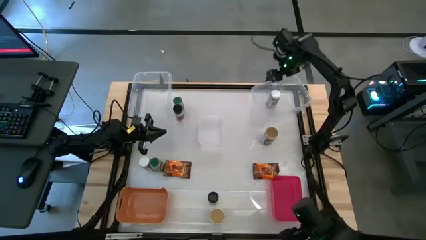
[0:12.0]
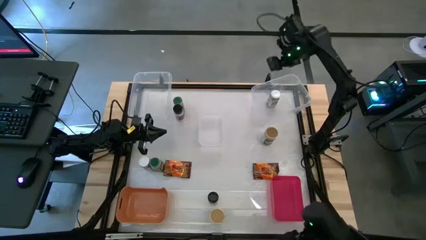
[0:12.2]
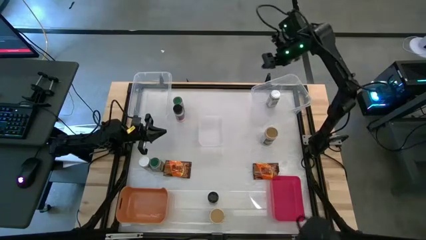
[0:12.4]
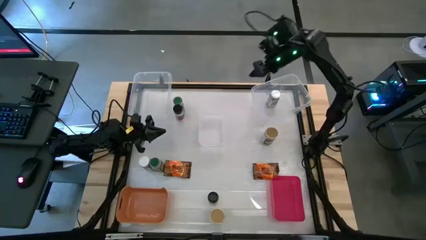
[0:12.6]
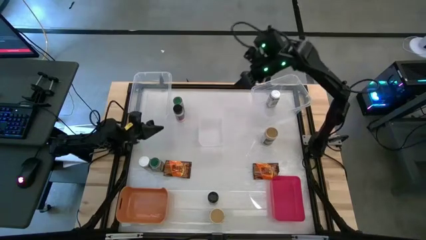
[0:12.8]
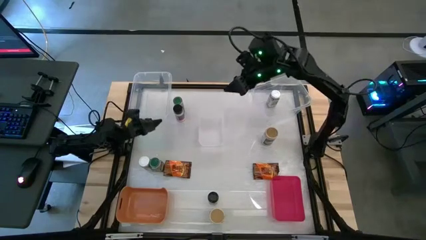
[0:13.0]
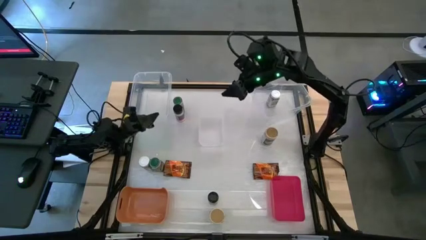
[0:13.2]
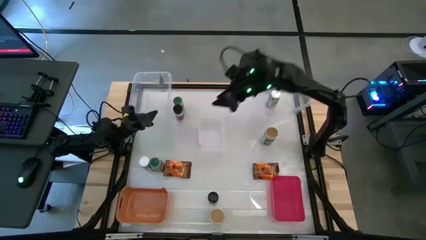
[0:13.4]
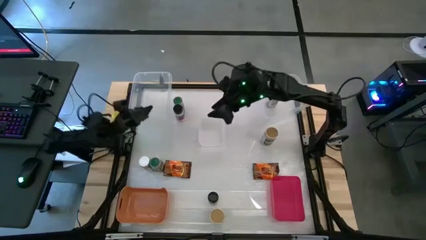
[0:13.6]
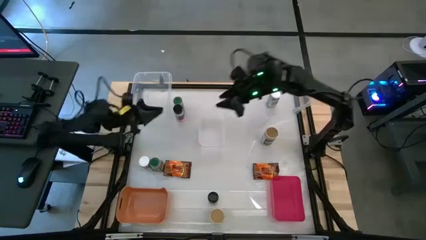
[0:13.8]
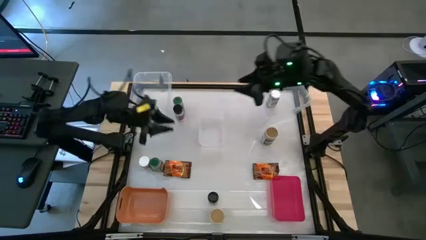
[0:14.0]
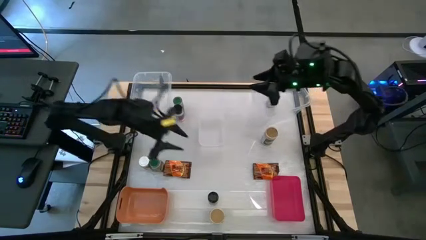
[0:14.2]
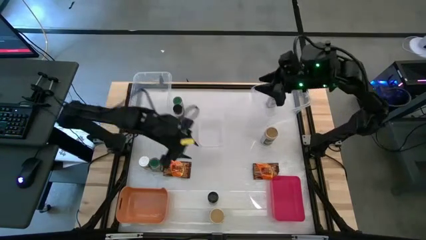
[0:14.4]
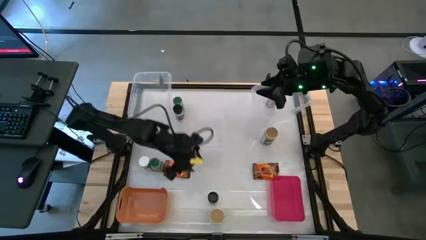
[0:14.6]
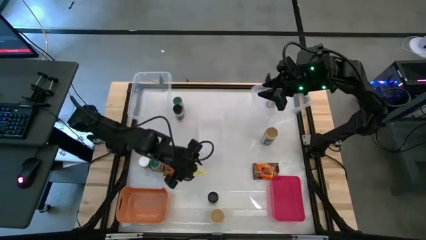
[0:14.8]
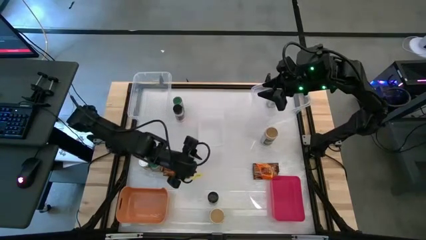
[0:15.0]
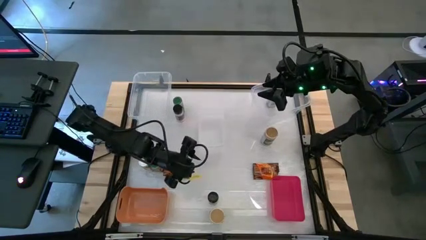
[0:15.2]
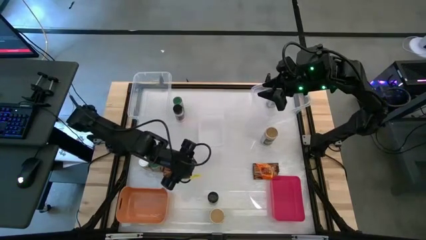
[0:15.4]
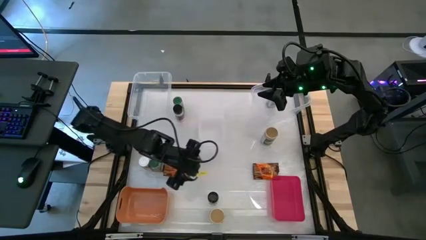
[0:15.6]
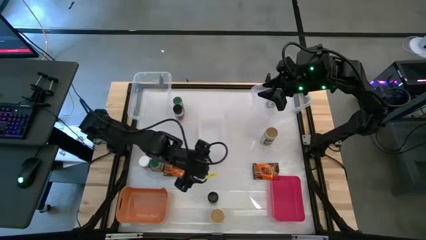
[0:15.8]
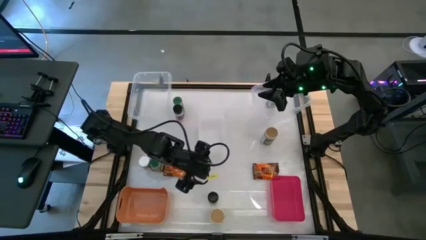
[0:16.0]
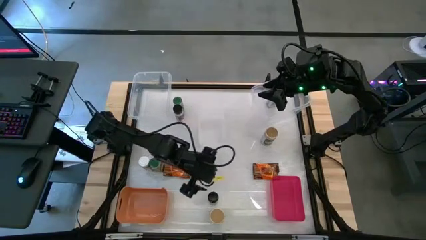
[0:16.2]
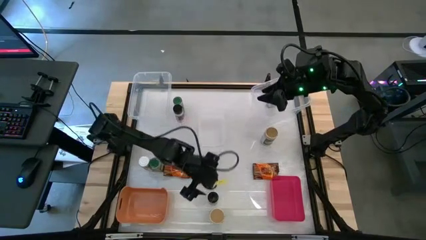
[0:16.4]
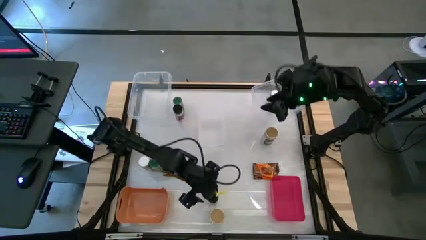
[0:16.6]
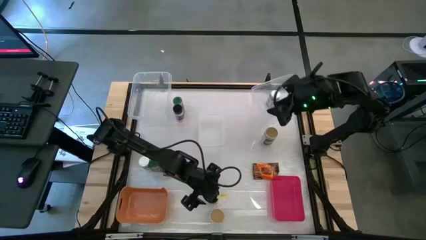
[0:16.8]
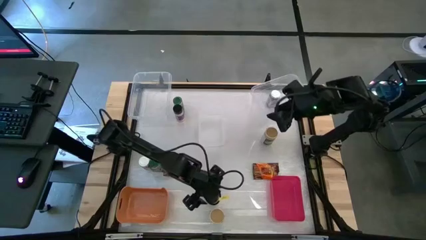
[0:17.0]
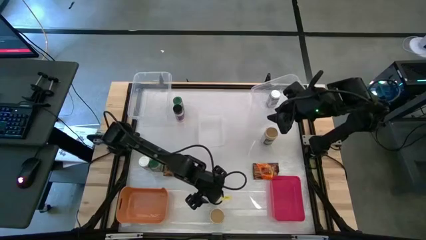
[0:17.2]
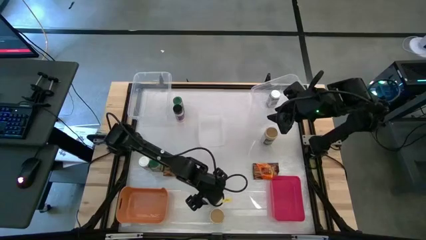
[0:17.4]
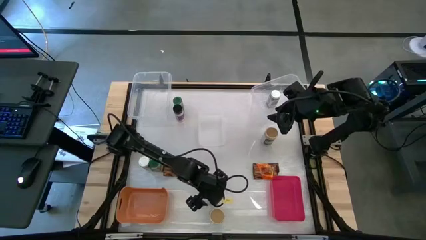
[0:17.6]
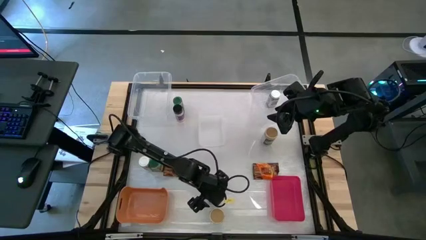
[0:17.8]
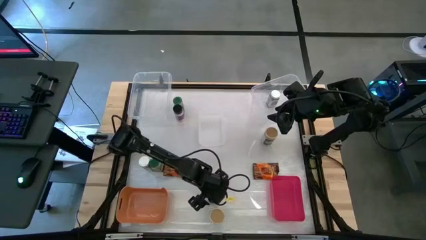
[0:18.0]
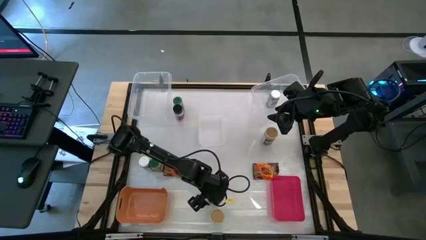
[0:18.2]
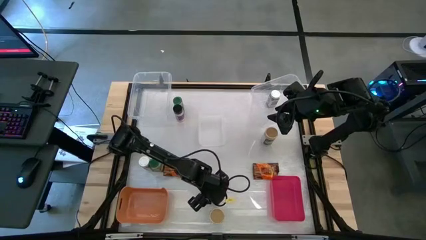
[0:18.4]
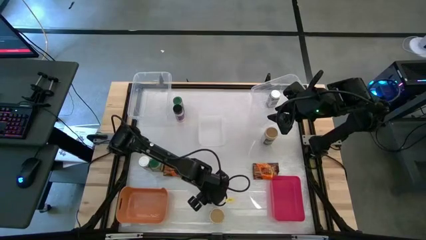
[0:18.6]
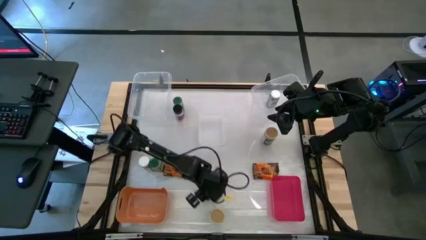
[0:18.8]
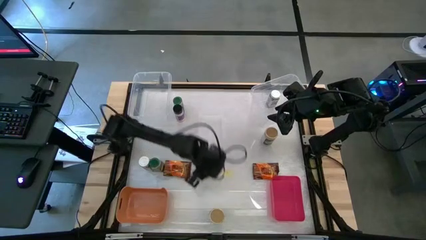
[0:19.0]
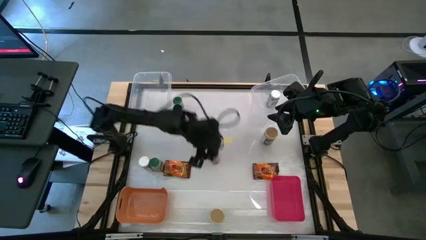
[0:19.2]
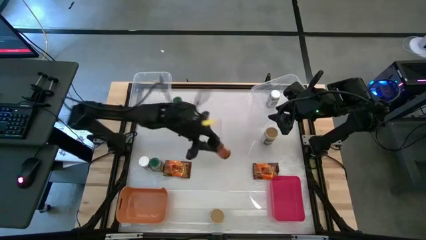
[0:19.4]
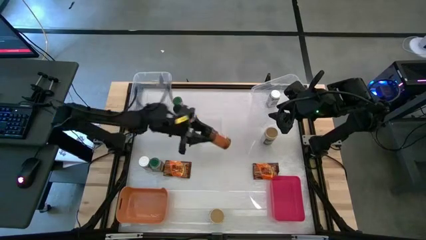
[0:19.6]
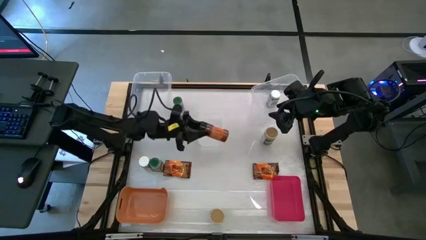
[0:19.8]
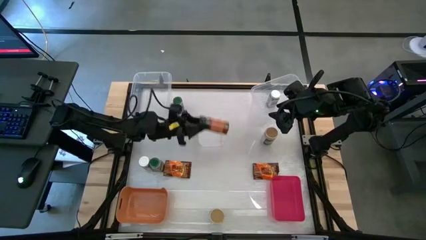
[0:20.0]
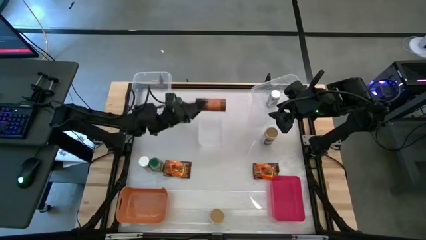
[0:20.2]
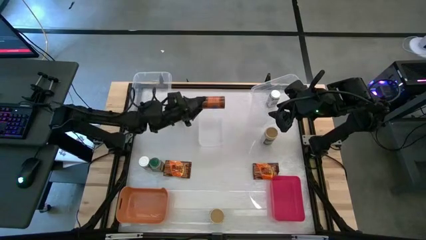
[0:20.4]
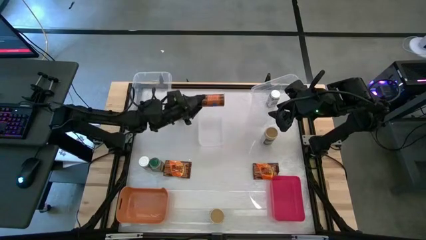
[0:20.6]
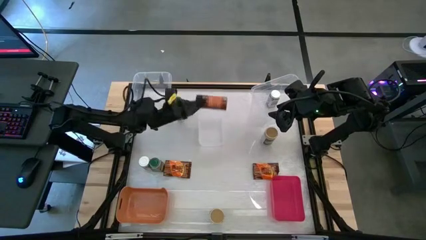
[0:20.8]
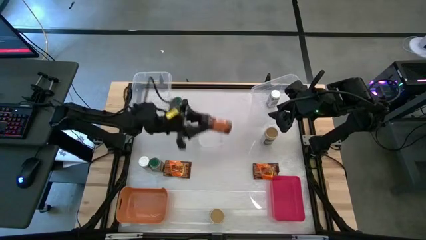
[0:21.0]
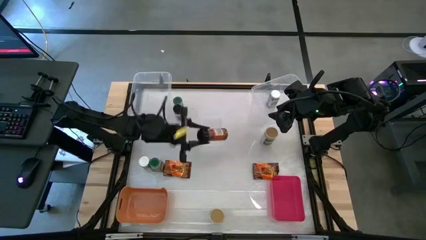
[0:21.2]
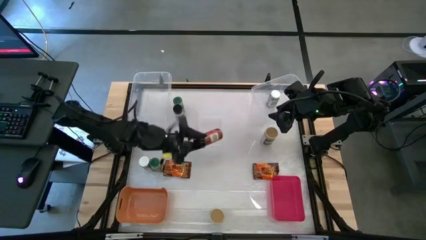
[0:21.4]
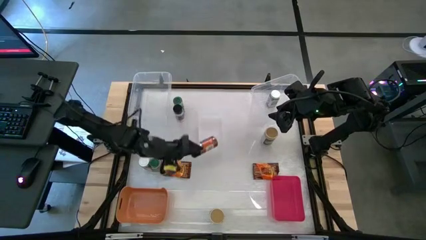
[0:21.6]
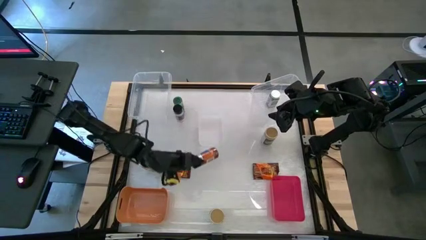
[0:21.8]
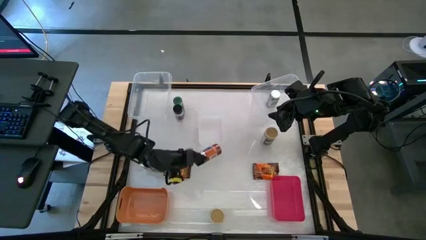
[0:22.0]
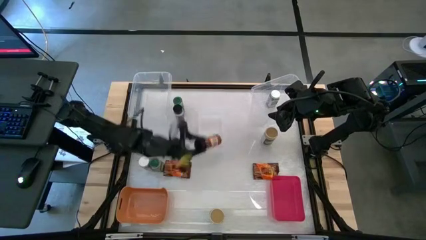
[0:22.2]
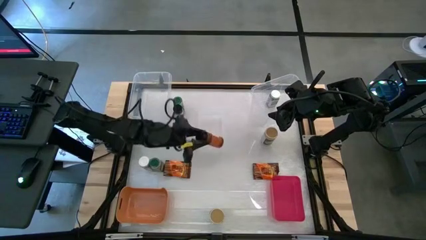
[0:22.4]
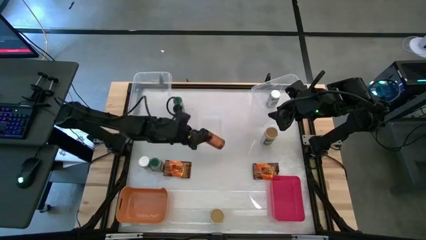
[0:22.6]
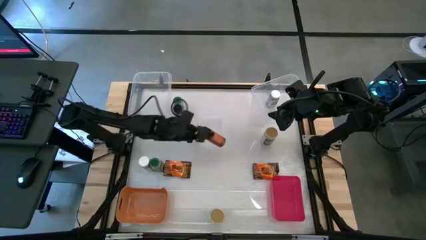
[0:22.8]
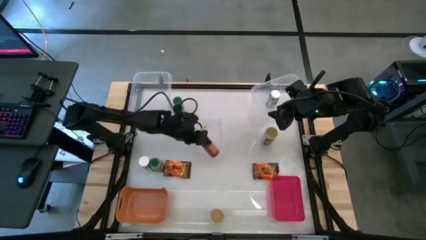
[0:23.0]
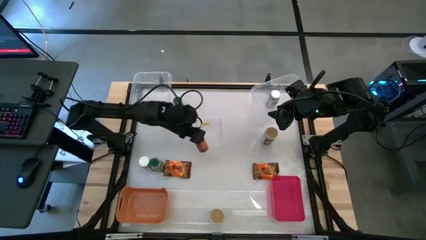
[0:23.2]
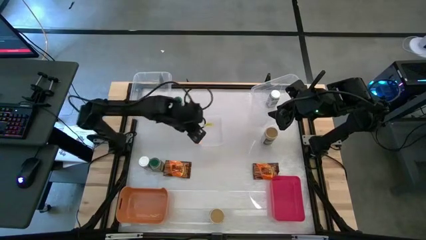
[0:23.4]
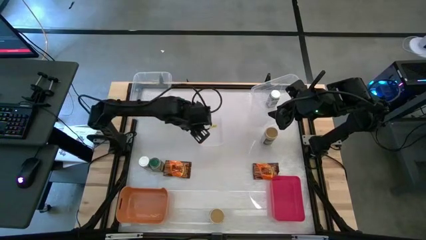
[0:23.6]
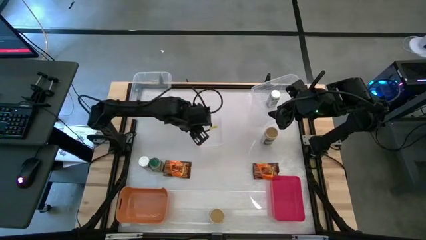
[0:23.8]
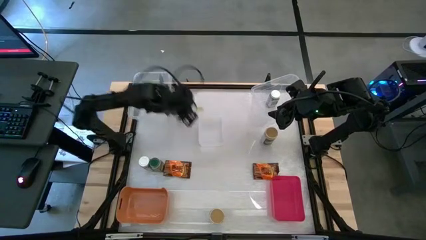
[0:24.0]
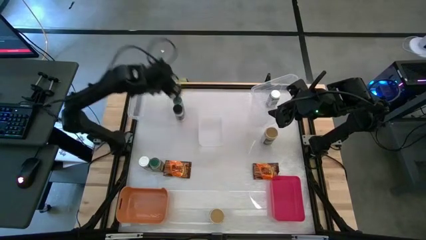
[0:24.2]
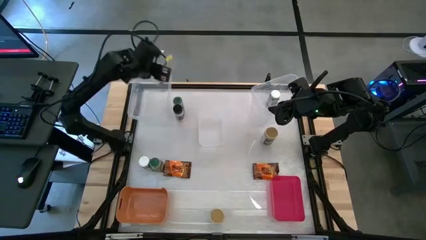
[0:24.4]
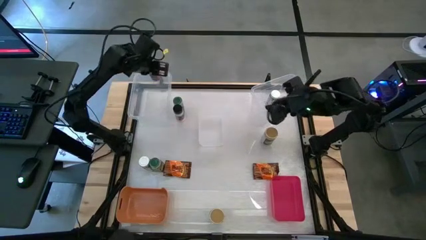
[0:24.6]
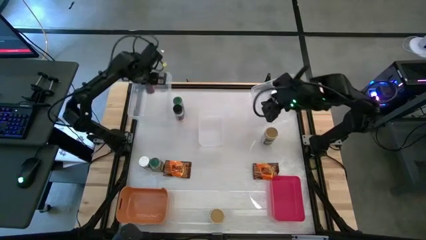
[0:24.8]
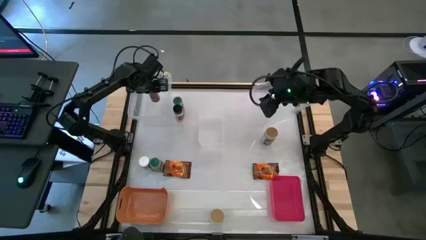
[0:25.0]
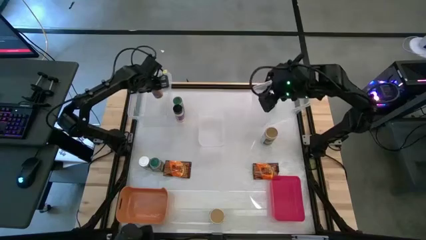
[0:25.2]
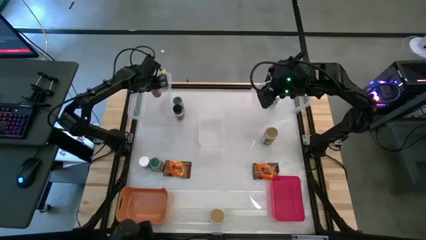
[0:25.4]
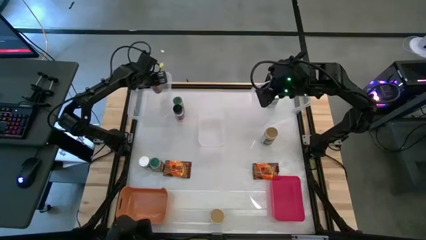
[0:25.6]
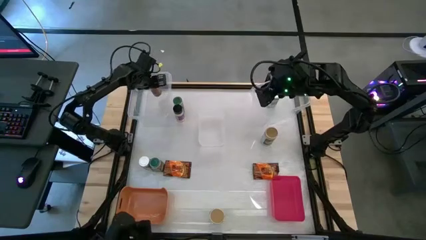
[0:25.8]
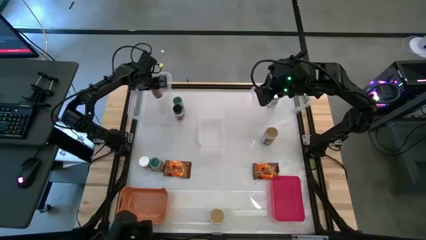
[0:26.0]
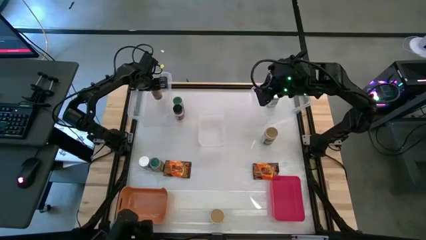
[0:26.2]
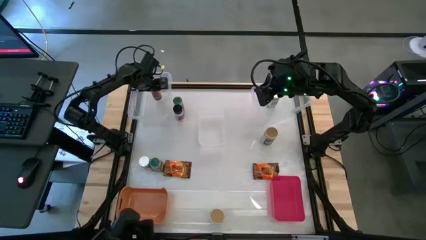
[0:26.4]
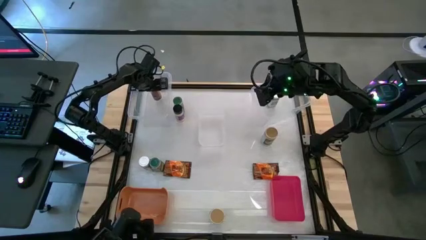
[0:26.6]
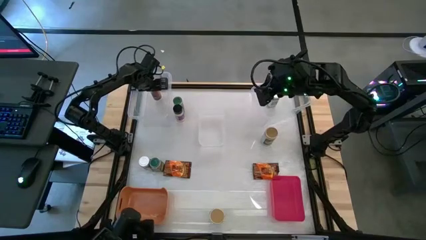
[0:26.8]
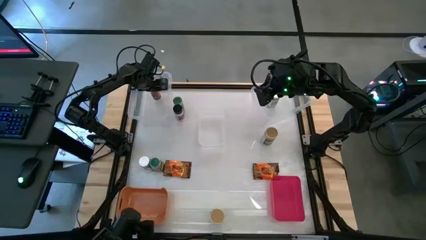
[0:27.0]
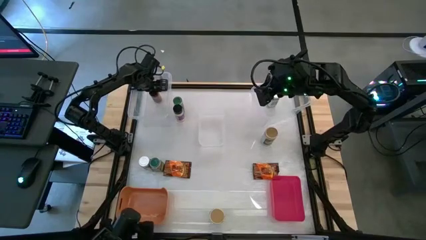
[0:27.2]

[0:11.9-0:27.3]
Task: Sort spices by type
Put the bottom black seasoning bottle into the left large transparent bin
